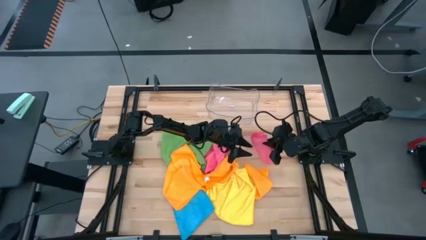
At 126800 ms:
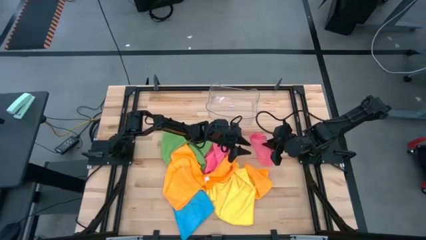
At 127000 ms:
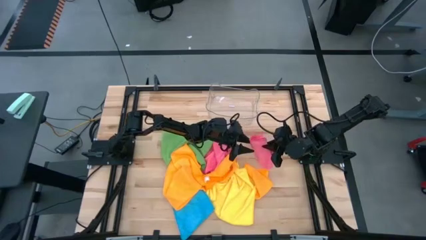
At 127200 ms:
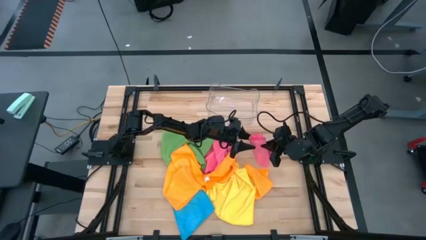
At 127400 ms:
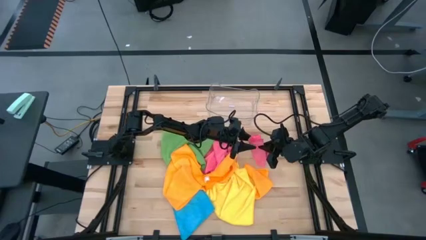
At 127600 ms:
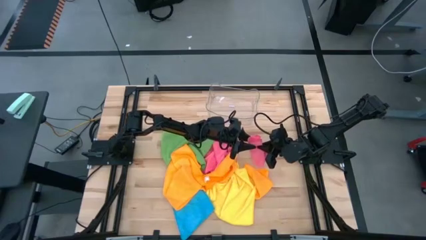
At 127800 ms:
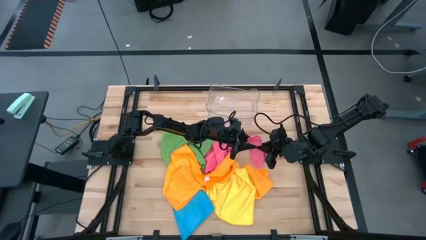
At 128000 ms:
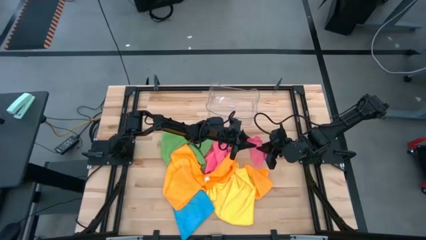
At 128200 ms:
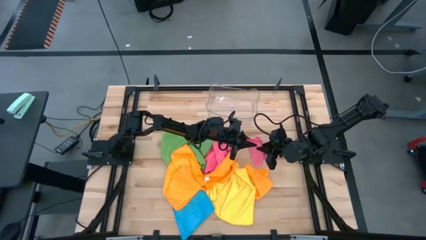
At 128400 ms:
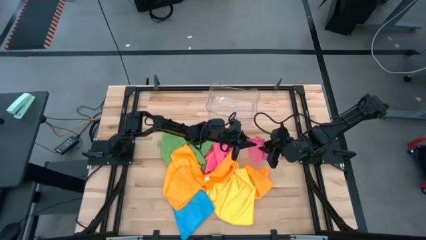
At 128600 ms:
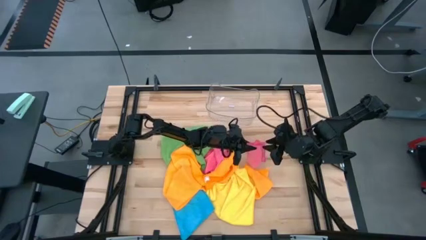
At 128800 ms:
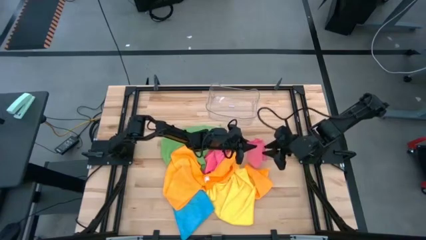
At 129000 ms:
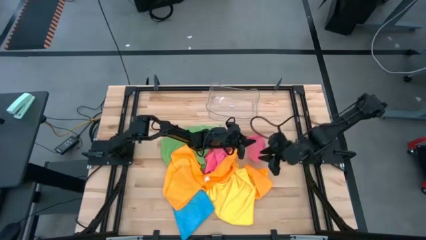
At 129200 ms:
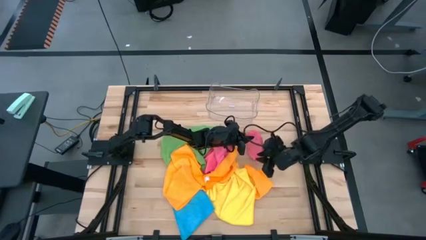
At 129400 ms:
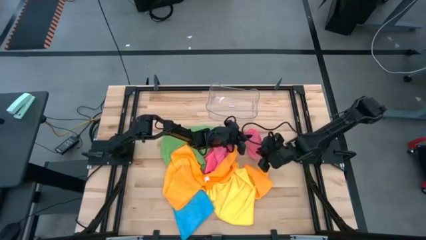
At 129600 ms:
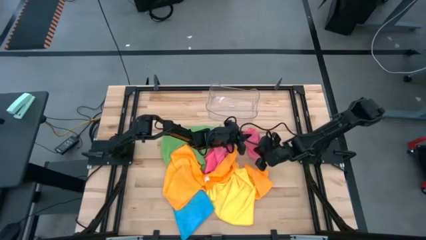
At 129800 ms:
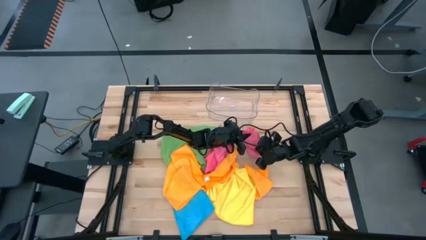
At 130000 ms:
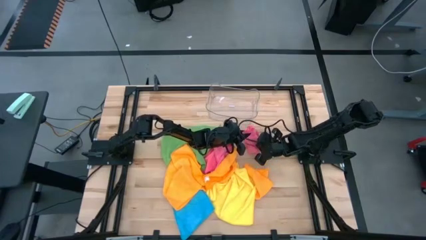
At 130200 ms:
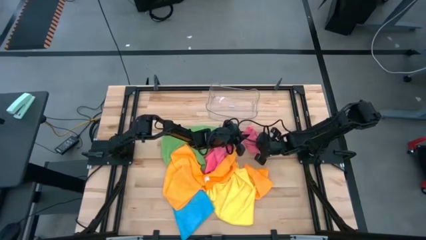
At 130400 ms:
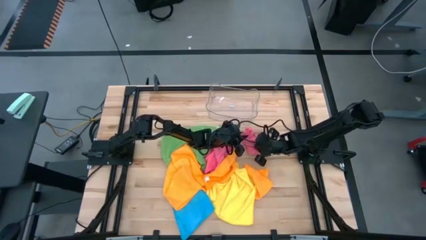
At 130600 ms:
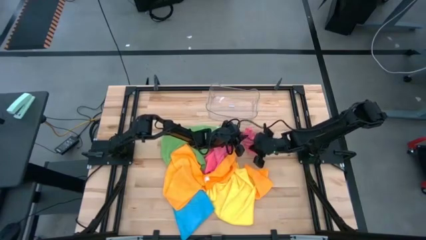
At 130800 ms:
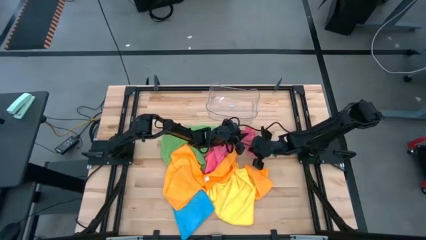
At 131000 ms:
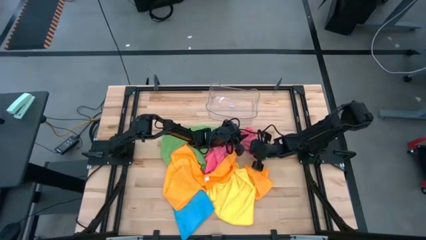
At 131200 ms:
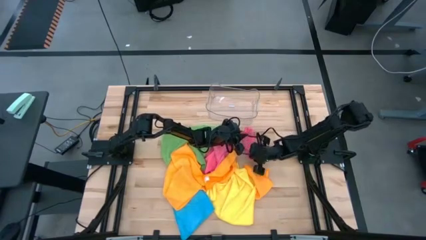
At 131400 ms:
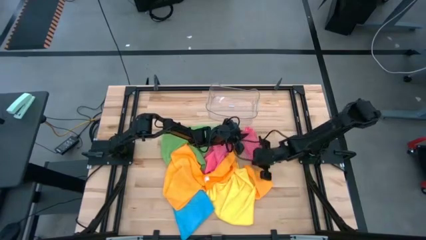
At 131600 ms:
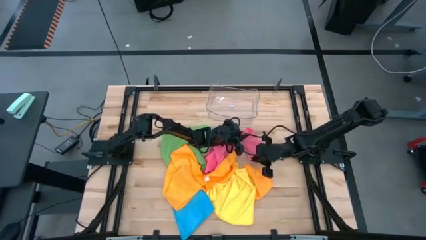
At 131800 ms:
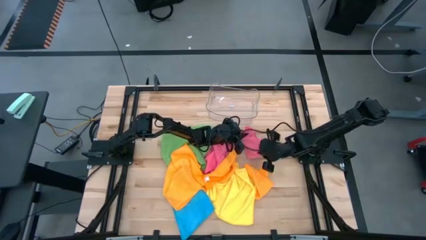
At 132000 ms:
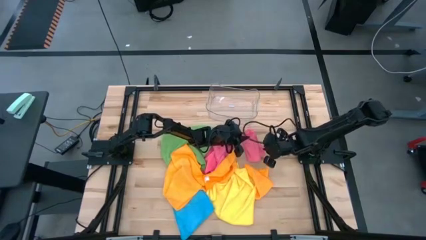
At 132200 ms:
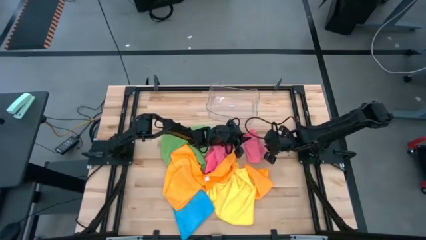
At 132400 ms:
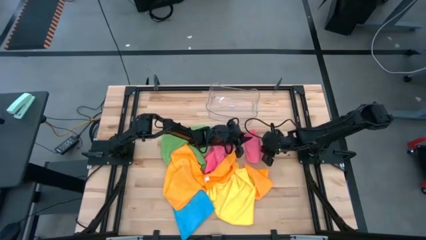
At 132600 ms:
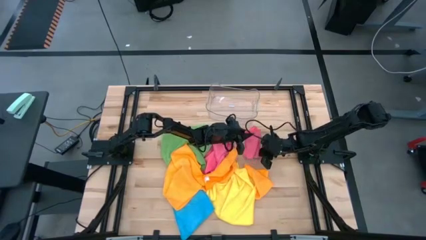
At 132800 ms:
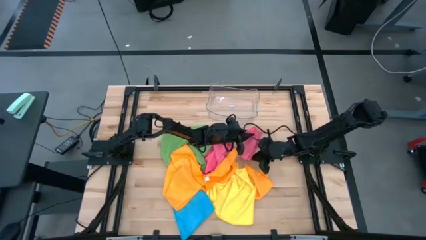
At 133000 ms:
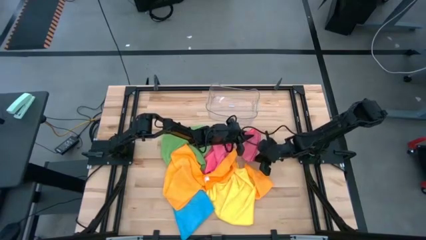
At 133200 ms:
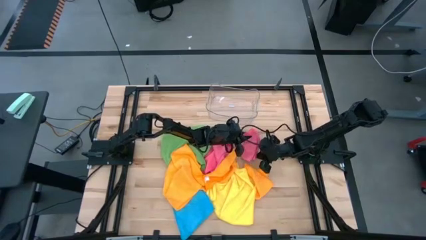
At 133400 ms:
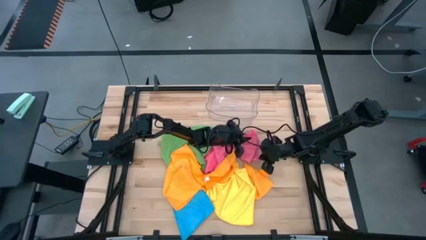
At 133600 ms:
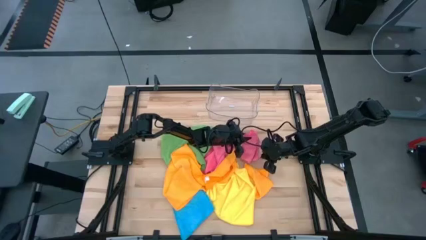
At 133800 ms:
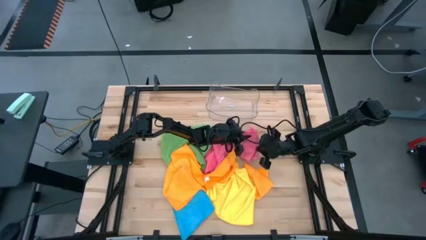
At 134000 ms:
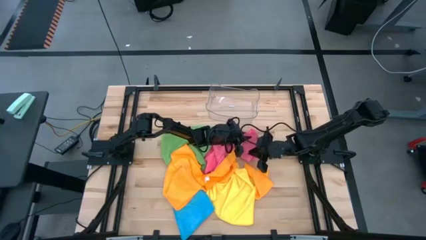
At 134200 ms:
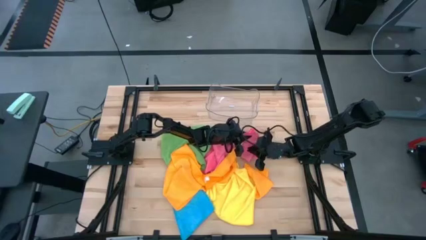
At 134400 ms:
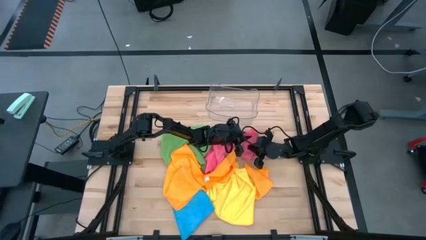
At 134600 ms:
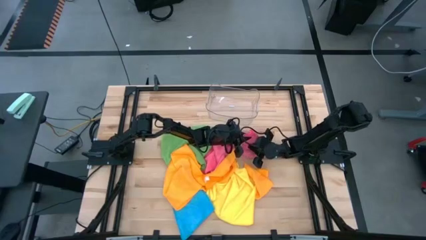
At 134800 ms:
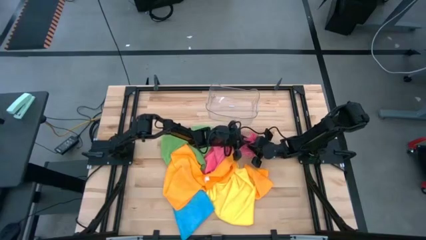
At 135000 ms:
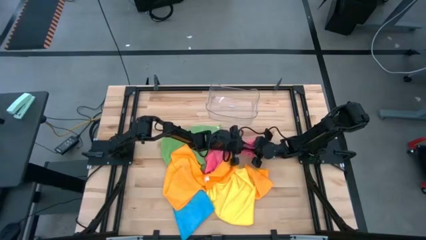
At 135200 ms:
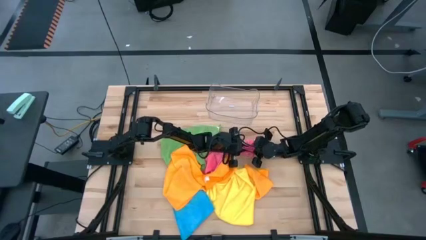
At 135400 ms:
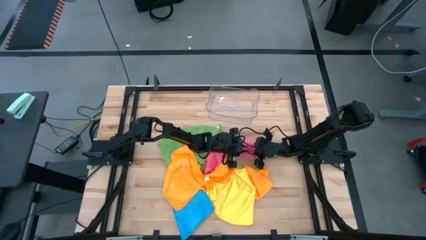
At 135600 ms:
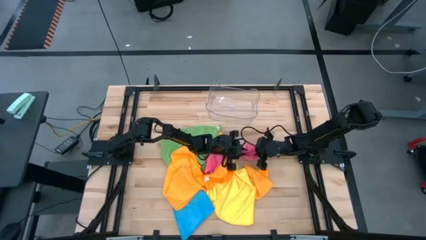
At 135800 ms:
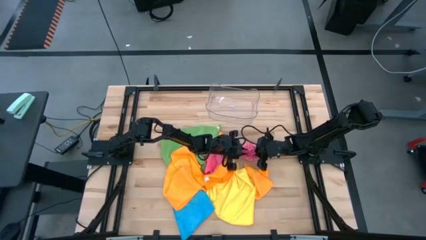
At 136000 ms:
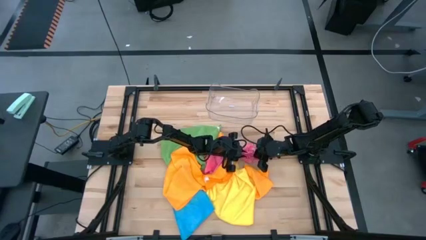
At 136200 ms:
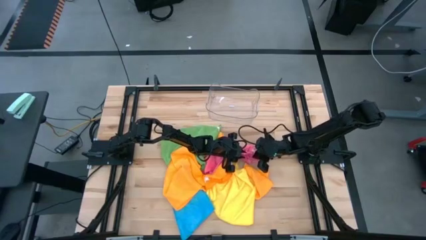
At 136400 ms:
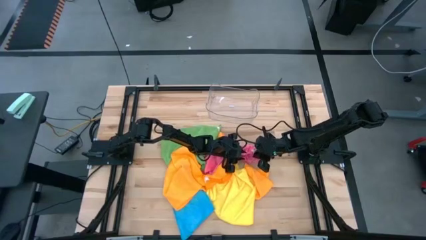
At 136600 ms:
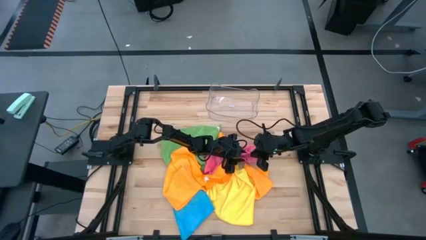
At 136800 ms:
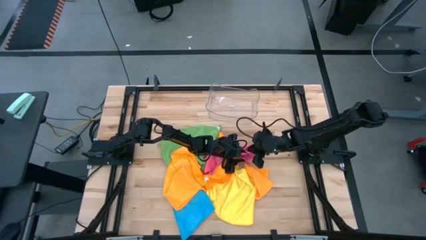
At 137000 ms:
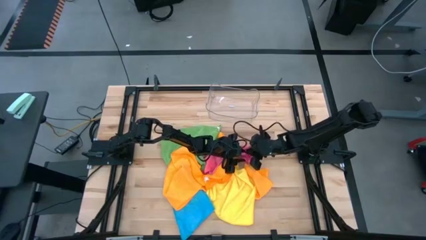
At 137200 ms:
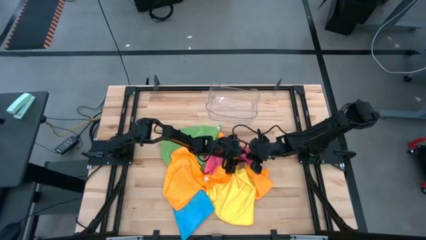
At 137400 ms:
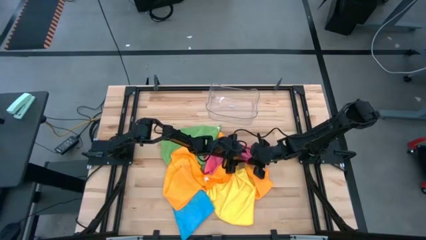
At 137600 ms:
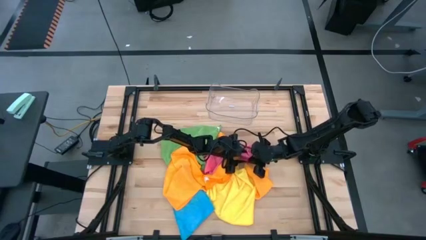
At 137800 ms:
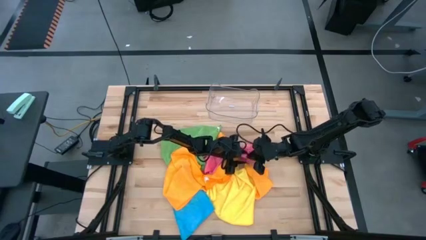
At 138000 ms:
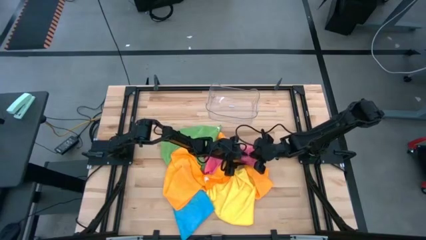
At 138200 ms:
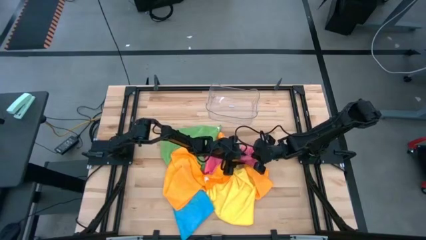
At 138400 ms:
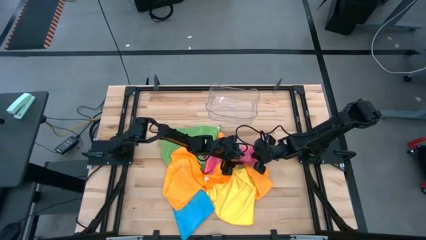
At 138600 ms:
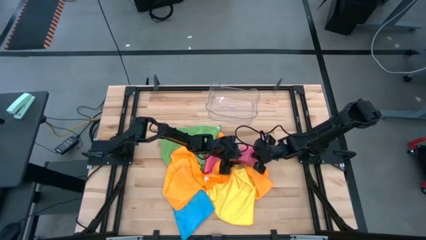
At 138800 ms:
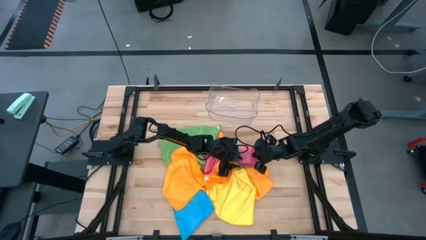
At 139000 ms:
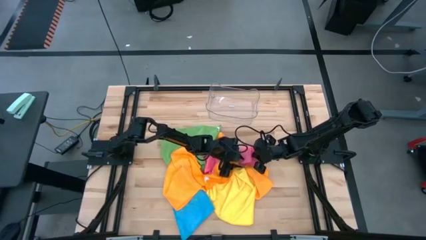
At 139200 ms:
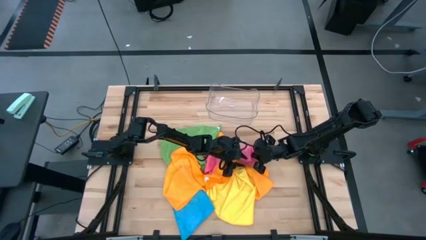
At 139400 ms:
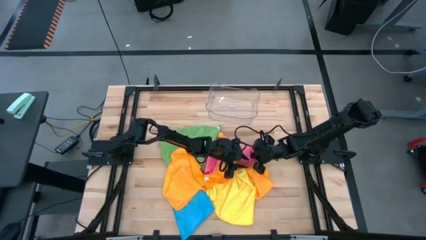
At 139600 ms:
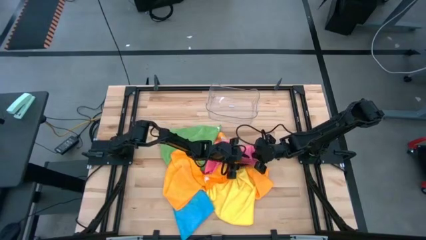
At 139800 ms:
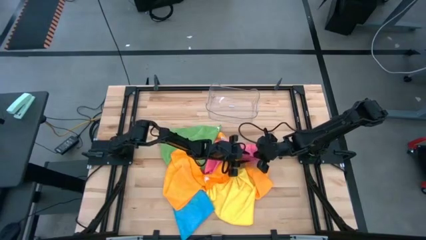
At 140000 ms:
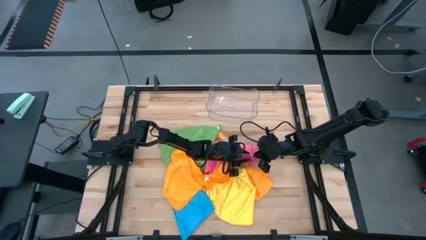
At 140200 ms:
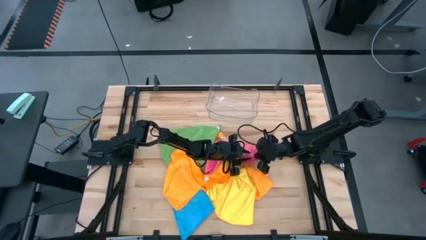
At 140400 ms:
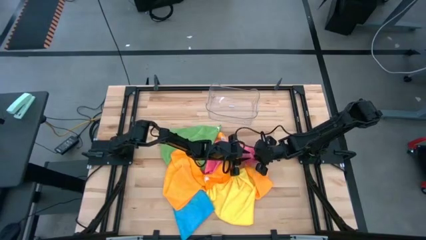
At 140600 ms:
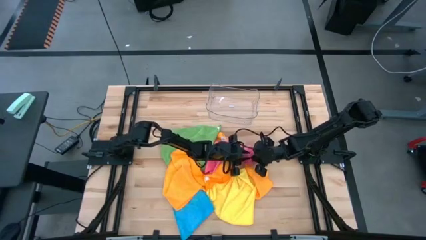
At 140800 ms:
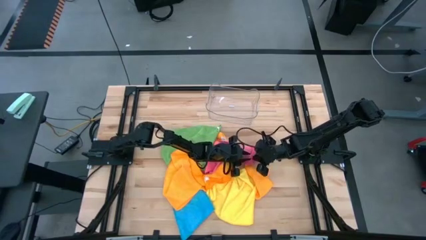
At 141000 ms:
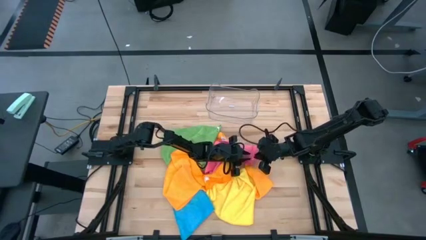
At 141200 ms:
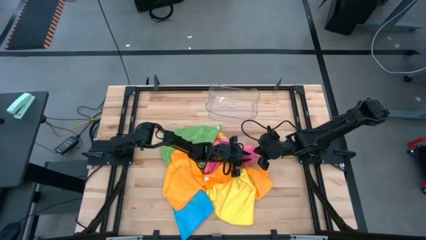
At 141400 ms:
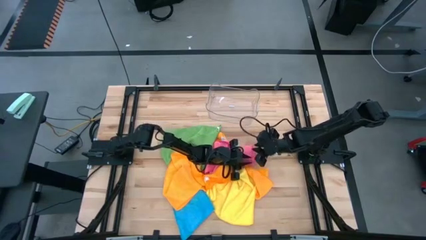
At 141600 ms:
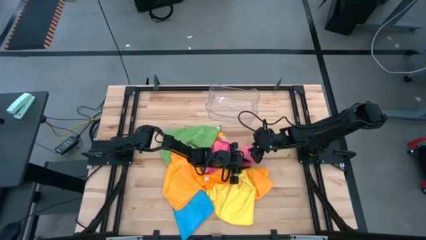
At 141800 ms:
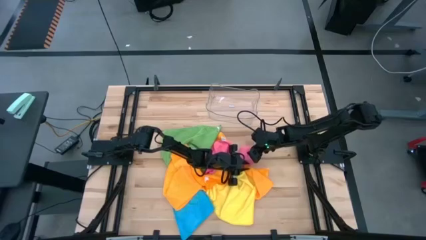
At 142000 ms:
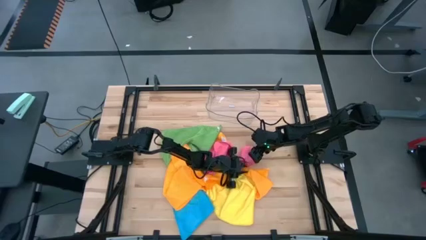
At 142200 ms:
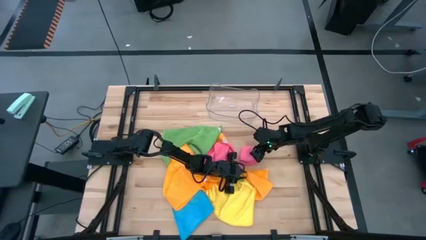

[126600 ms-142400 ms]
Task: Fold microfiber towels
Fold the pink microfiber cloth
